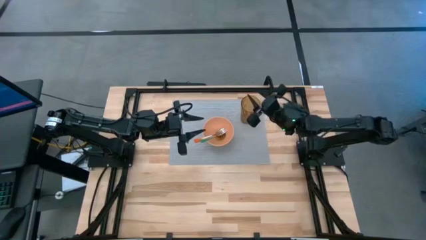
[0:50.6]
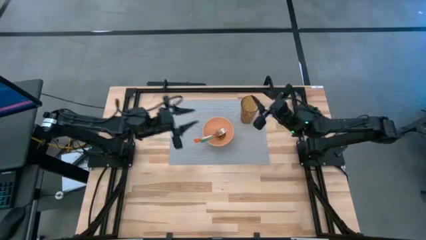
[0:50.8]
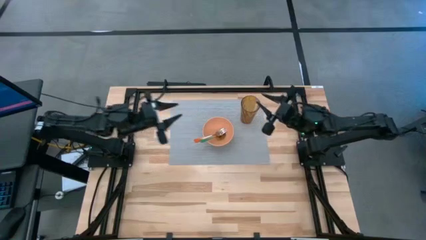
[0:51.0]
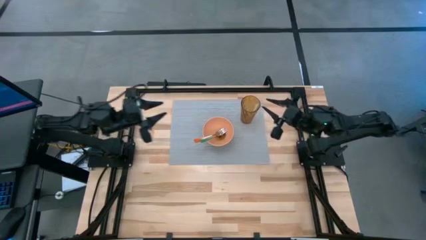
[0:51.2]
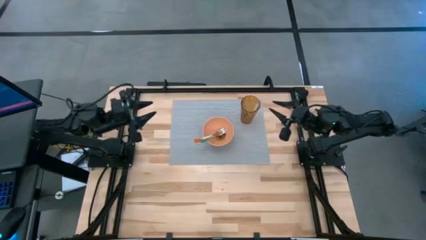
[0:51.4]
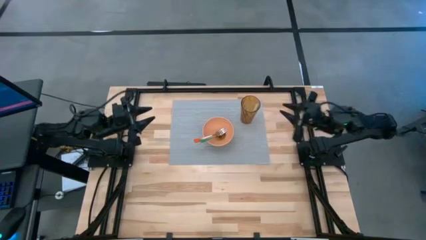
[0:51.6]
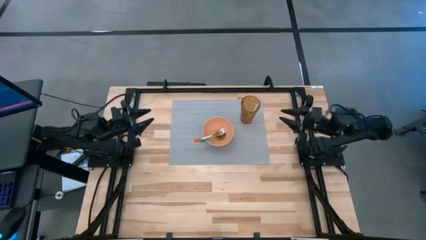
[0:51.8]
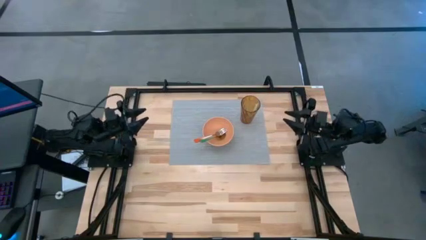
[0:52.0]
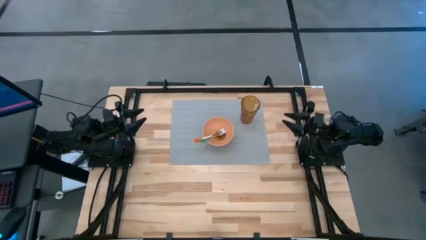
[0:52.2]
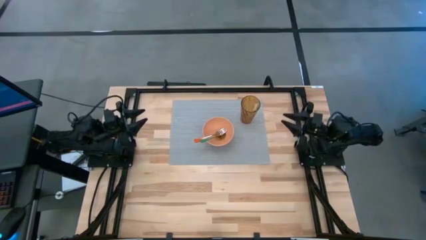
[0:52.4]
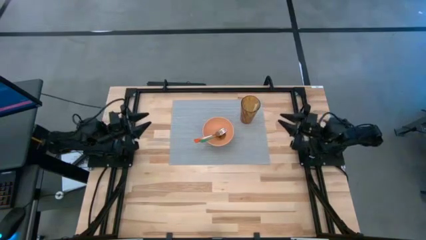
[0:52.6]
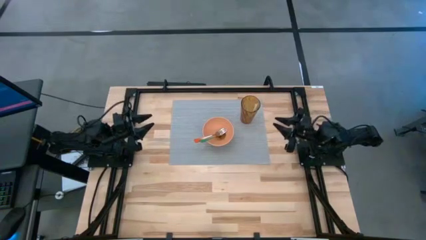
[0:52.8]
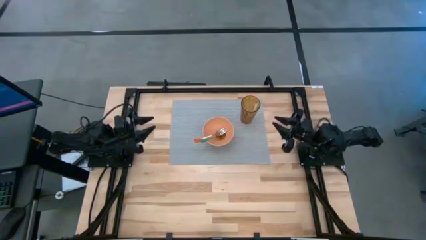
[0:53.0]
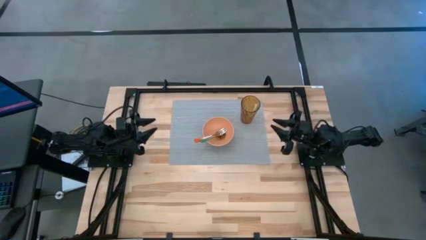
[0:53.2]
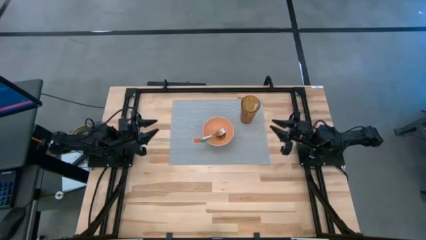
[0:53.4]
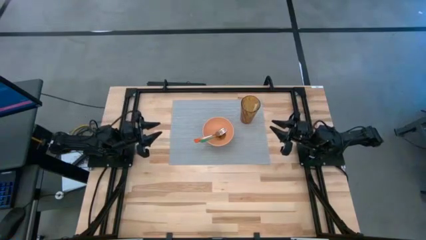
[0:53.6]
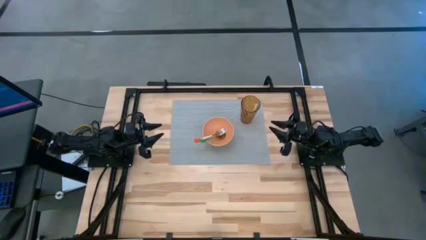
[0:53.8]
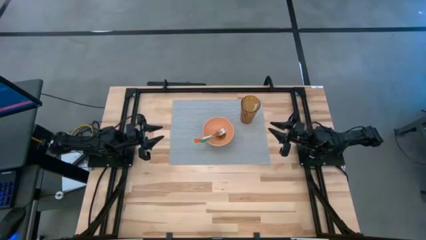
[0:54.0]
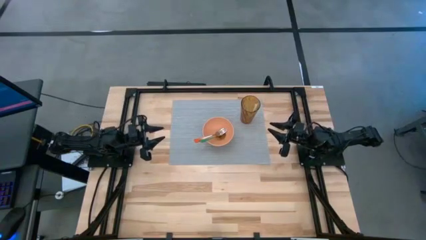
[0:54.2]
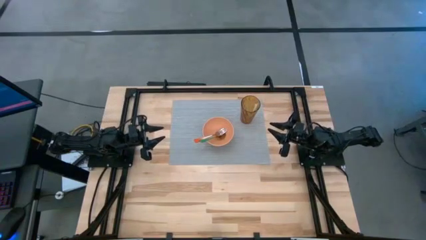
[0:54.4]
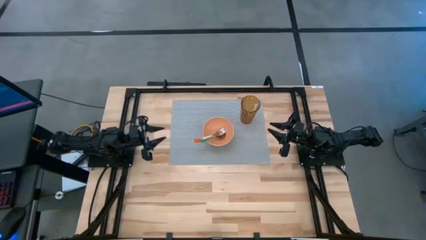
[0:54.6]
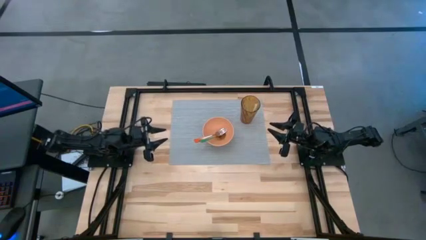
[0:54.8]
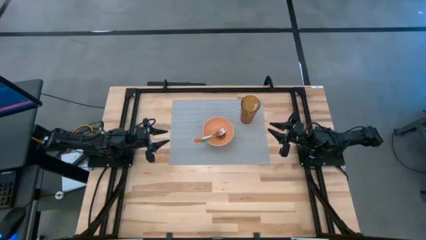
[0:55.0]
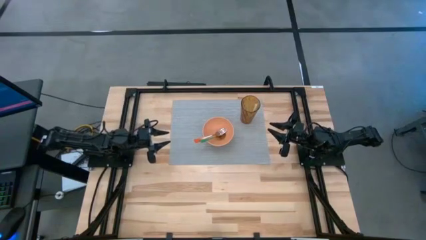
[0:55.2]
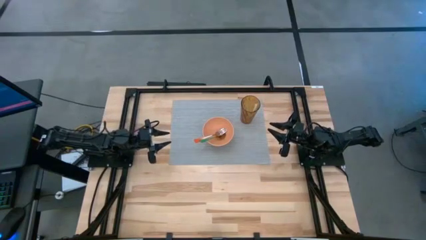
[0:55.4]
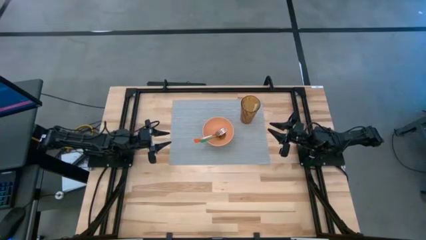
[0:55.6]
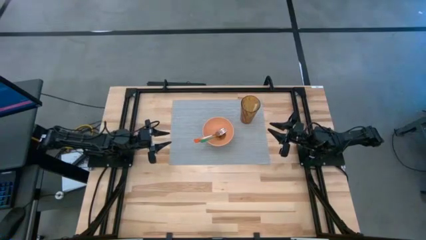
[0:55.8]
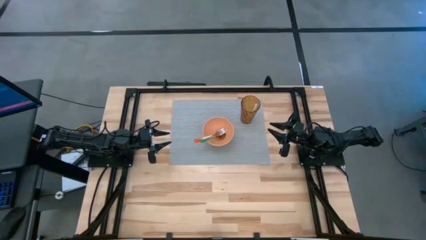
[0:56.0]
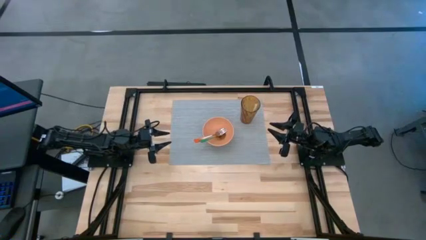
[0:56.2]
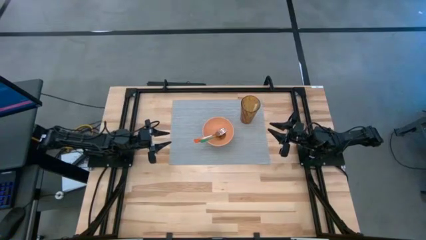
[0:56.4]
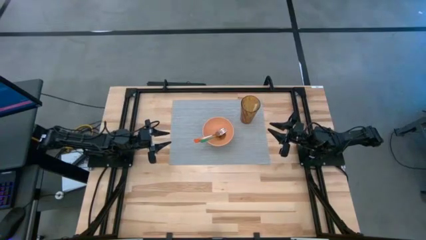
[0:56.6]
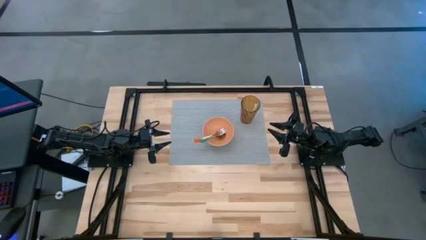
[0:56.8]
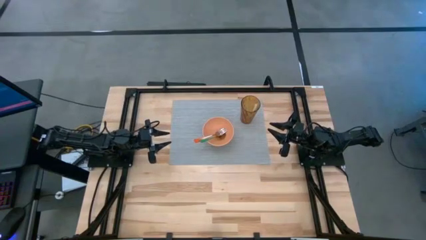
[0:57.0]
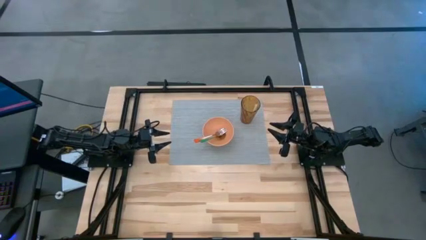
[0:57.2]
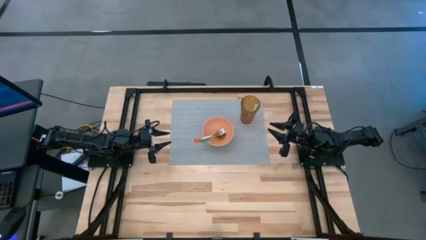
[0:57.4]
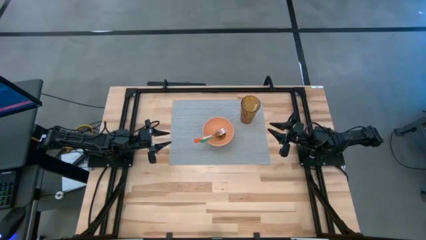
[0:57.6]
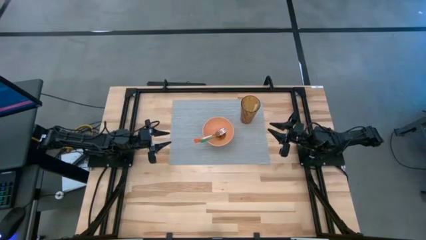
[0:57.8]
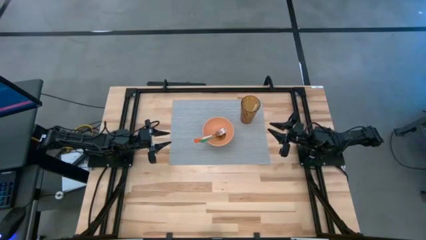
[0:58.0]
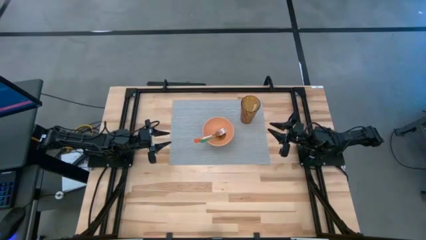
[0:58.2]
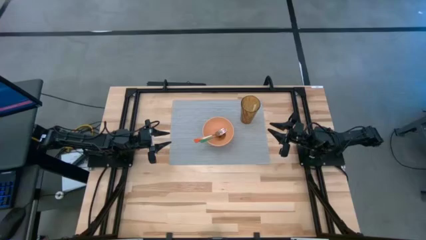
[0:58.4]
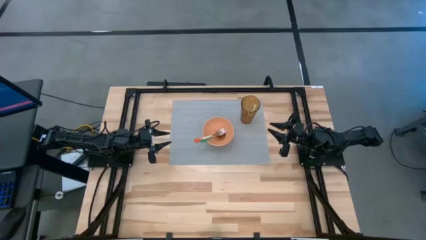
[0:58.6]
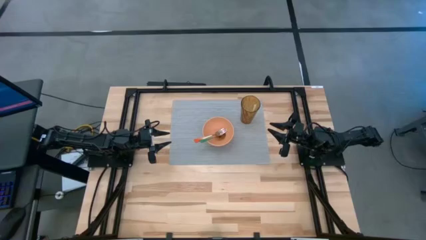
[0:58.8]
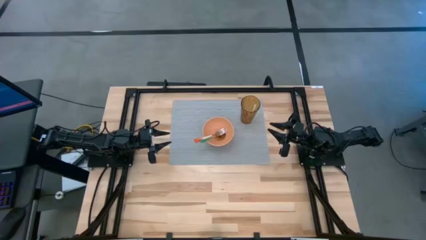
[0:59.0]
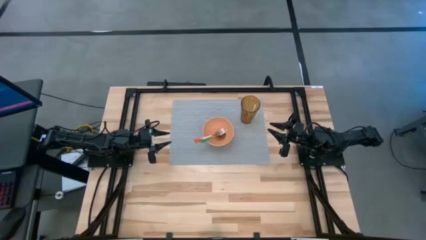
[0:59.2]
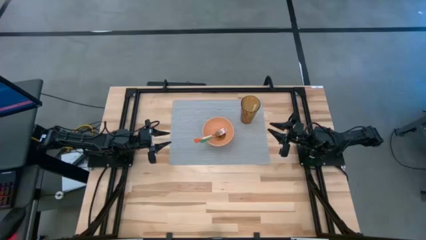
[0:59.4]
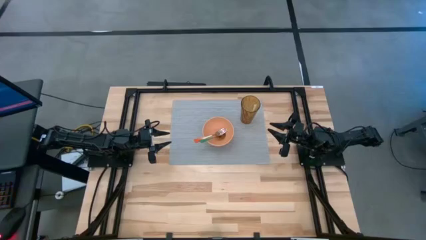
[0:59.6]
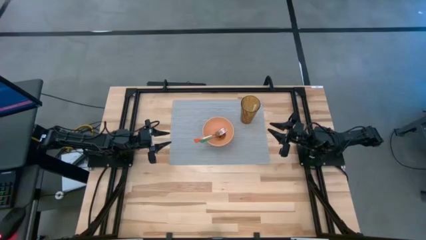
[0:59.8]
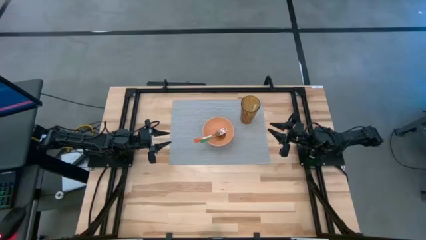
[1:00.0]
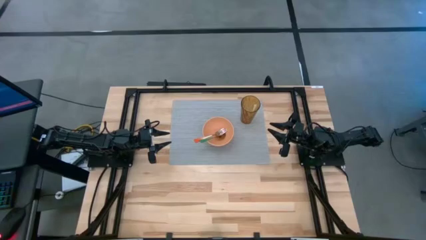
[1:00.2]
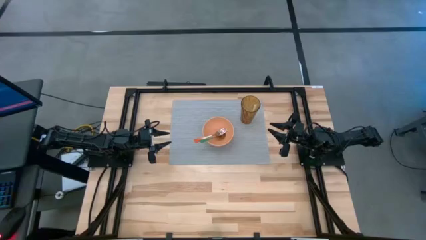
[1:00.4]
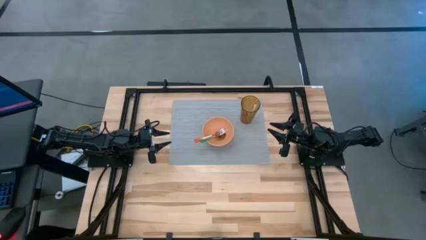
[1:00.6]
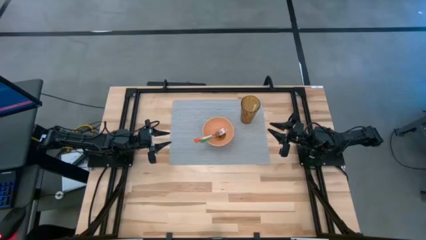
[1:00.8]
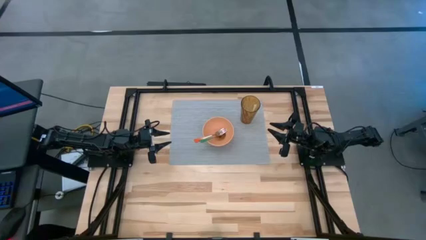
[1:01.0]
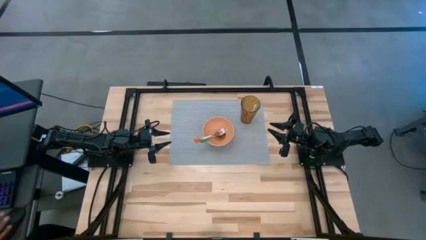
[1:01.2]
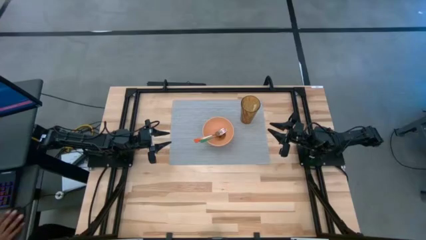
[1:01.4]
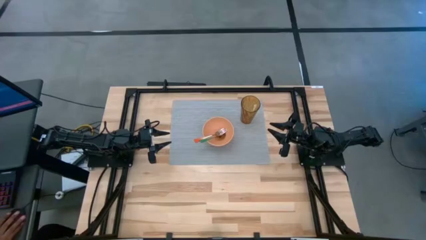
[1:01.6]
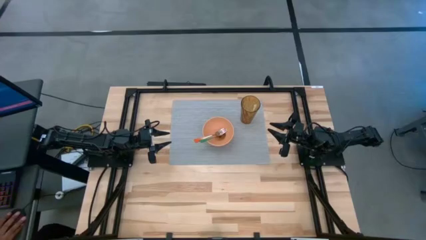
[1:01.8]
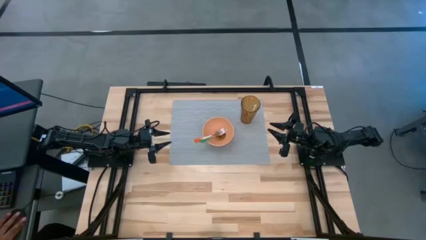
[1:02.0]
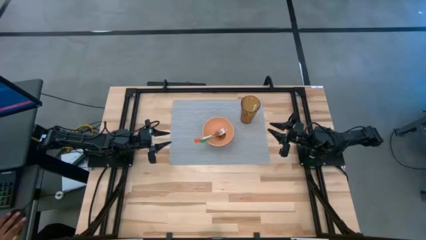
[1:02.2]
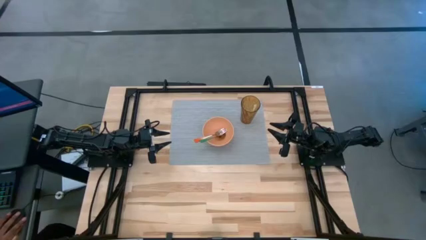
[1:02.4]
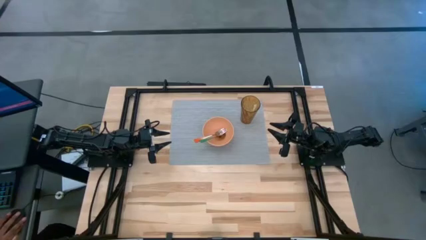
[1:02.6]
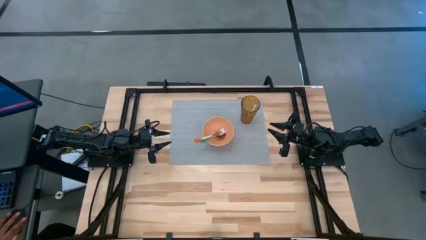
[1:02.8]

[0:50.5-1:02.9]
Task: Pick & Place Utensil
Return to Home Position

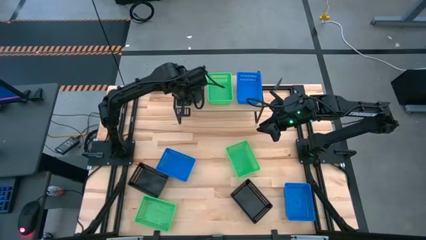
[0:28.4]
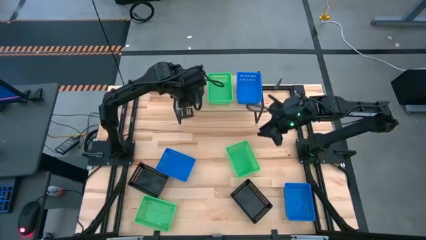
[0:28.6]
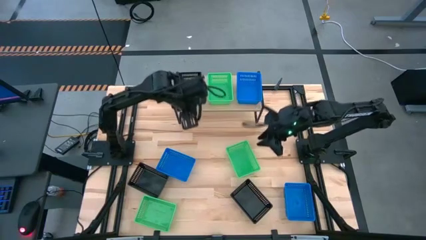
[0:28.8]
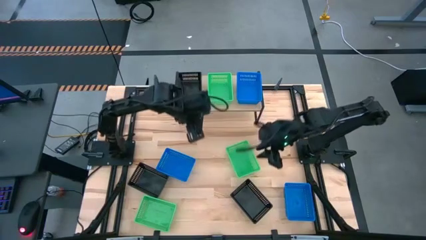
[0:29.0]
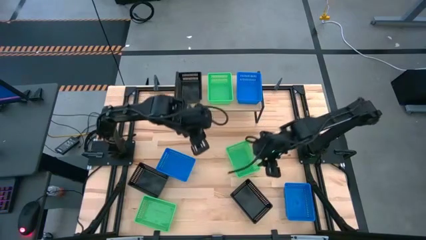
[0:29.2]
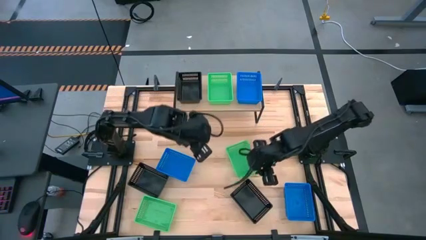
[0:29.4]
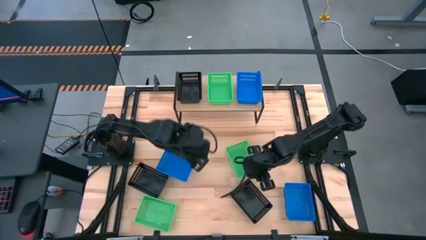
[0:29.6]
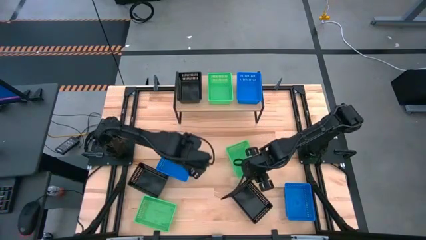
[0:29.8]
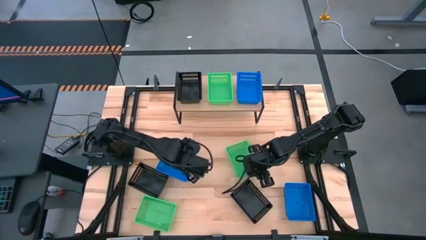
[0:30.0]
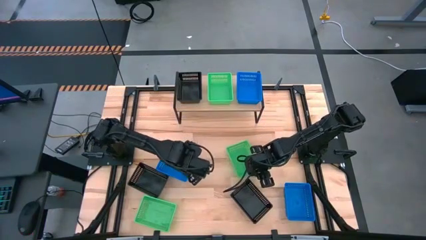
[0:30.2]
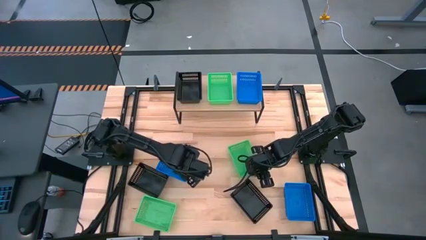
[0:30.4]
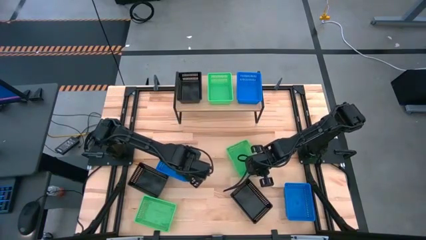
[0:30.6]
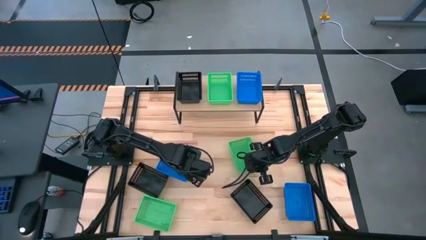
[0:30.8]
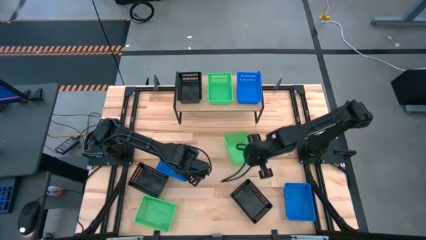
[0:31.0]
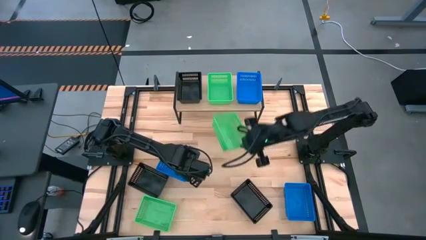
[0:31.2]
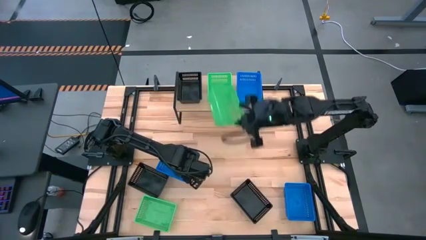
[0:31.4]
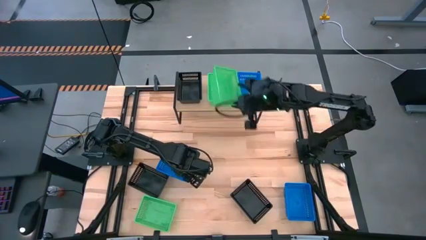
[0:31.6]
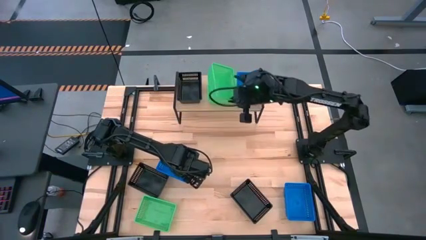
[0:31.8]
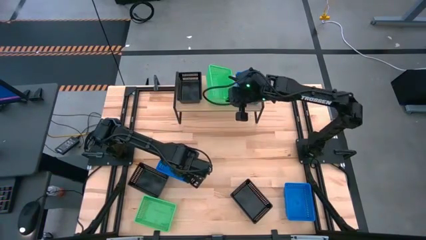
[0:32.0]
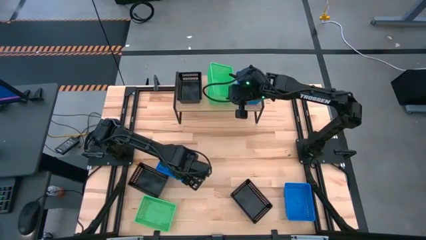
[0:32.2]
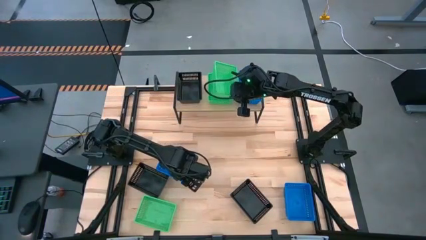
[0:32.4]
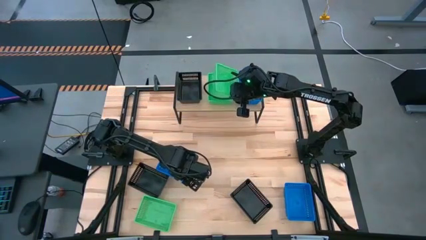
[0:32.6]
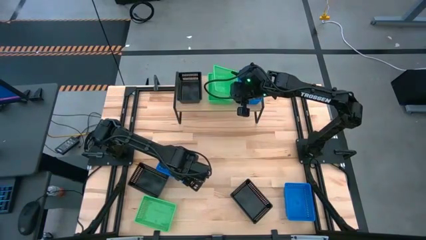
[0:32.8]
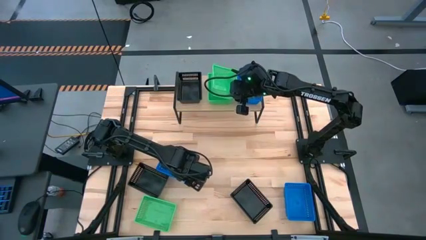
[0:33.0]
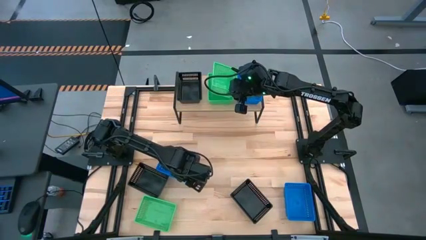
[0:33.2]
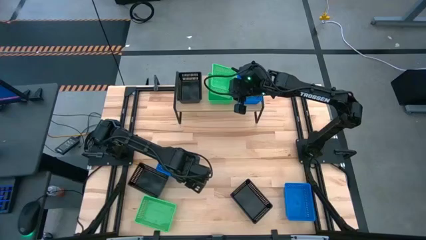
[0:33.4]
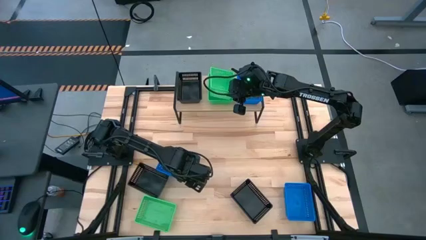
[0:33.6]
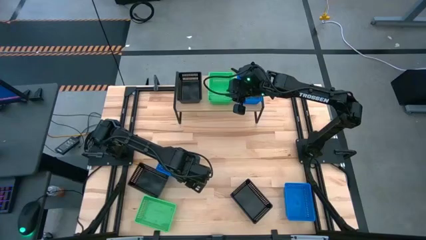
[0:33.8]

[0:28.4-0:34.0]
Task: Stack baskets on shelf by color
Stack the top green basket on top of the other green basket on the shelf
